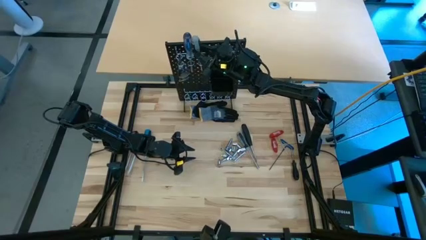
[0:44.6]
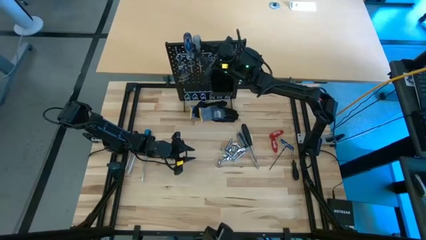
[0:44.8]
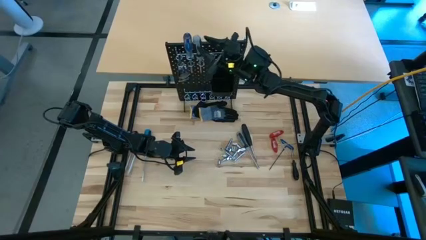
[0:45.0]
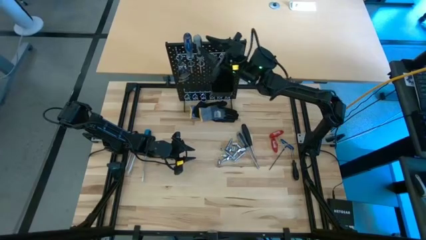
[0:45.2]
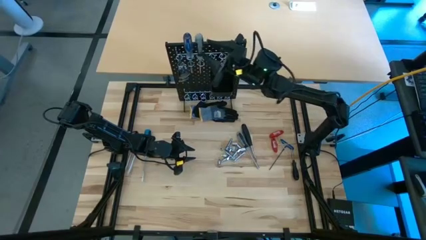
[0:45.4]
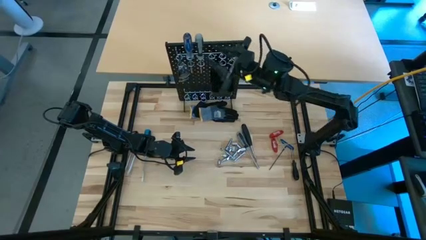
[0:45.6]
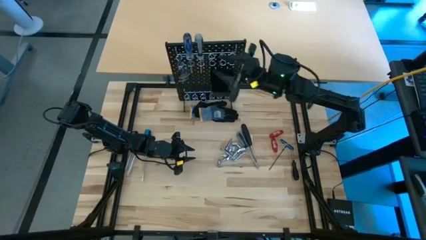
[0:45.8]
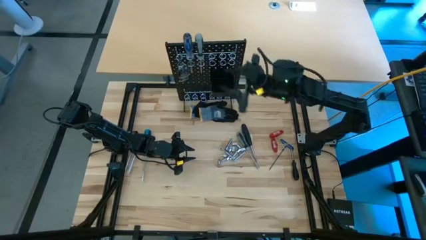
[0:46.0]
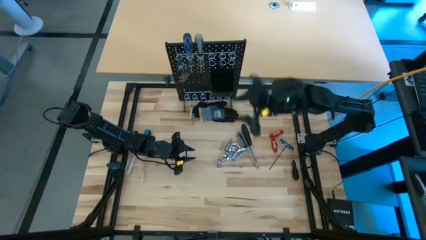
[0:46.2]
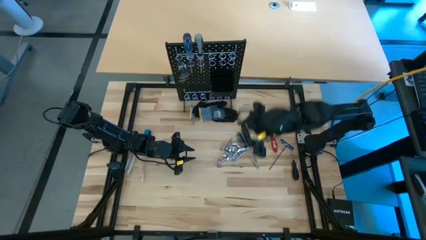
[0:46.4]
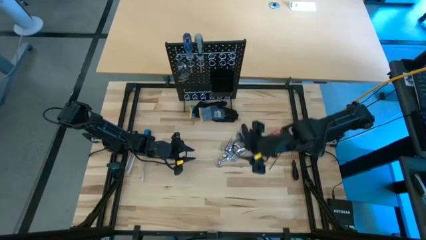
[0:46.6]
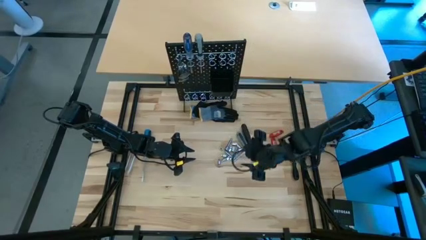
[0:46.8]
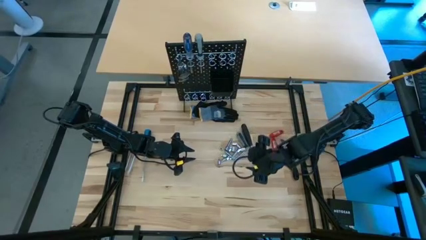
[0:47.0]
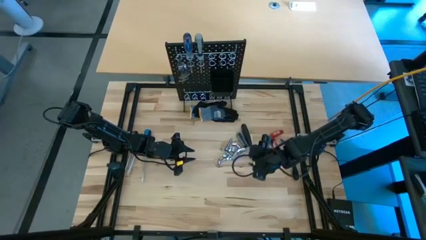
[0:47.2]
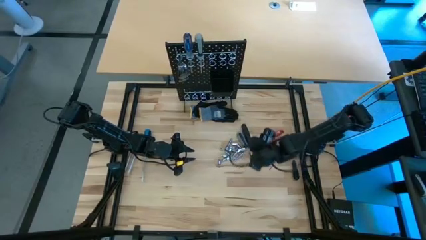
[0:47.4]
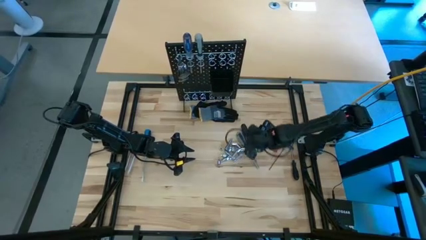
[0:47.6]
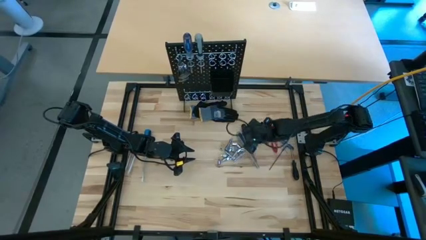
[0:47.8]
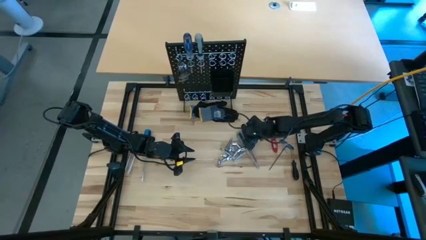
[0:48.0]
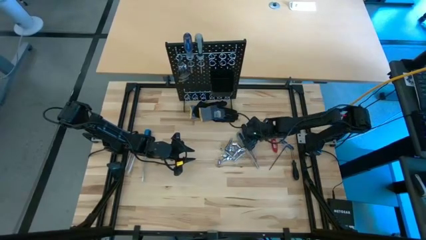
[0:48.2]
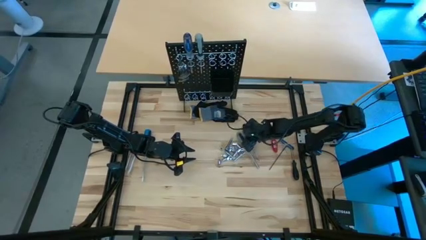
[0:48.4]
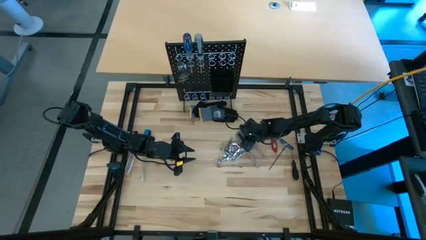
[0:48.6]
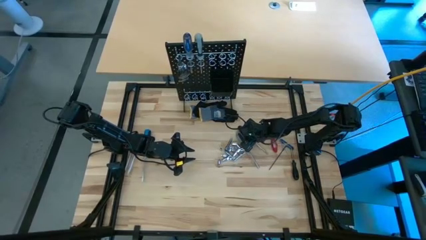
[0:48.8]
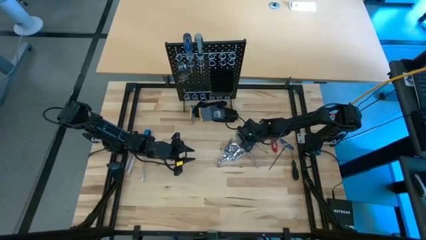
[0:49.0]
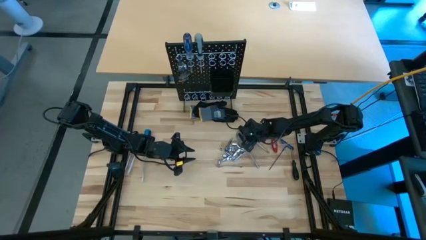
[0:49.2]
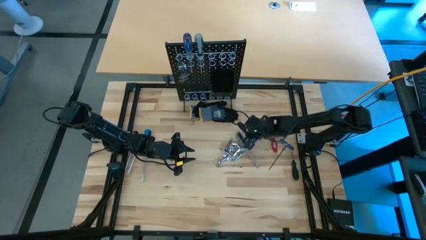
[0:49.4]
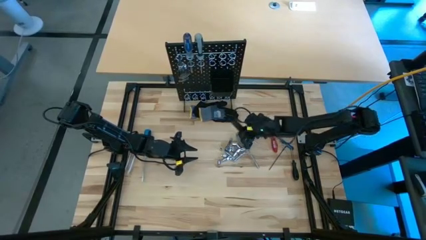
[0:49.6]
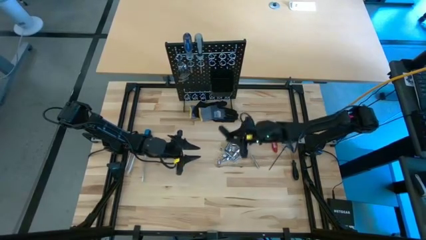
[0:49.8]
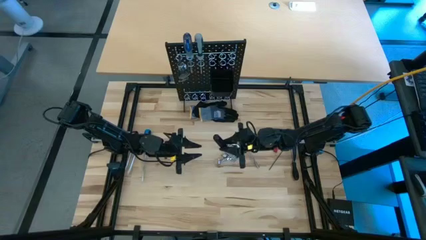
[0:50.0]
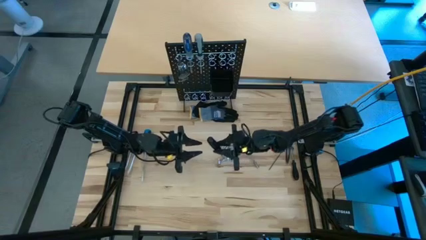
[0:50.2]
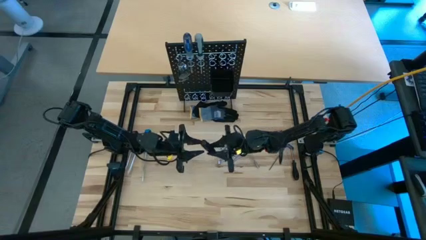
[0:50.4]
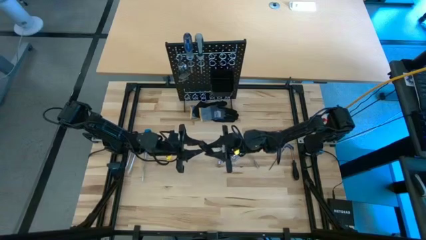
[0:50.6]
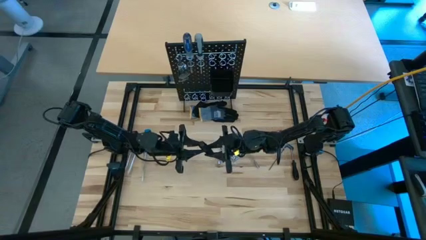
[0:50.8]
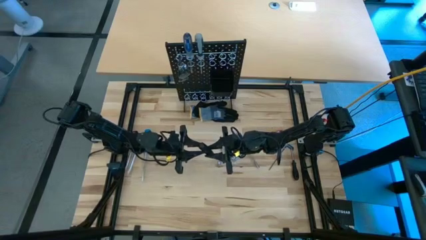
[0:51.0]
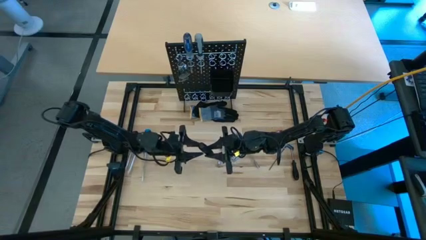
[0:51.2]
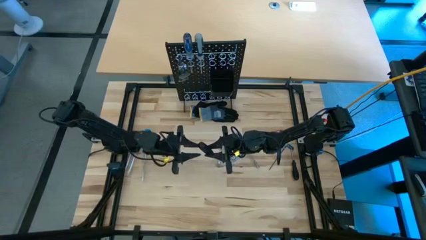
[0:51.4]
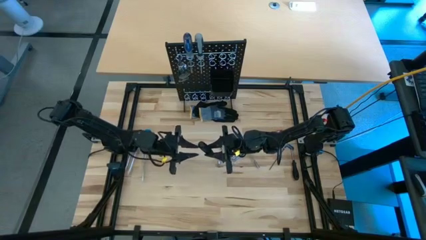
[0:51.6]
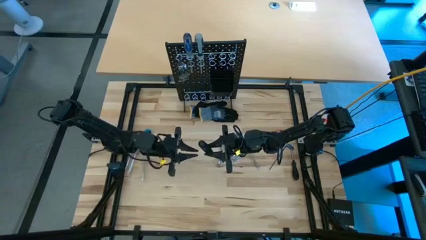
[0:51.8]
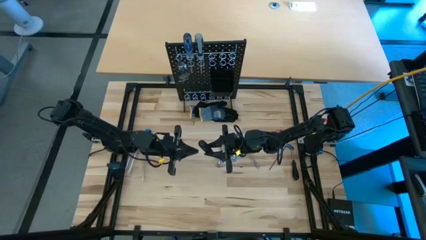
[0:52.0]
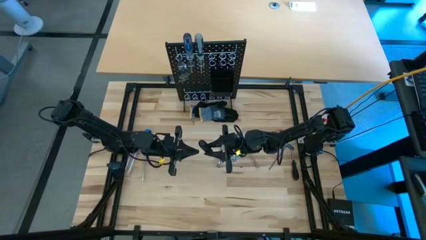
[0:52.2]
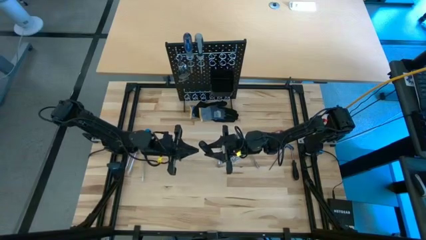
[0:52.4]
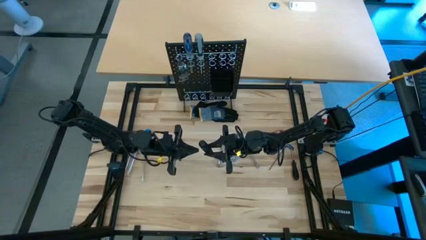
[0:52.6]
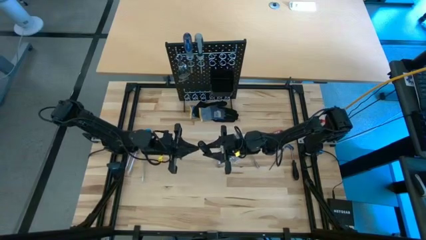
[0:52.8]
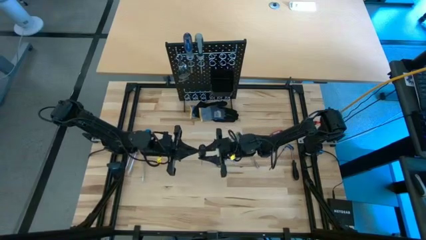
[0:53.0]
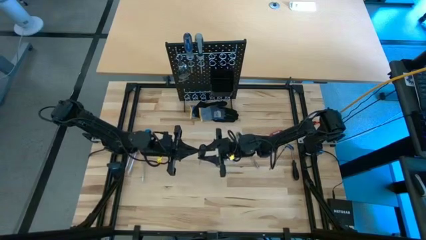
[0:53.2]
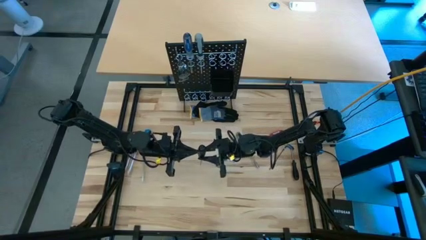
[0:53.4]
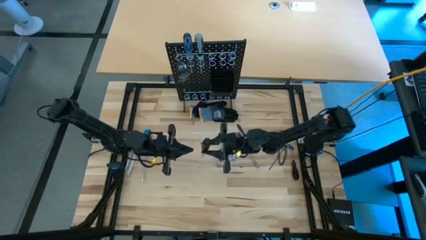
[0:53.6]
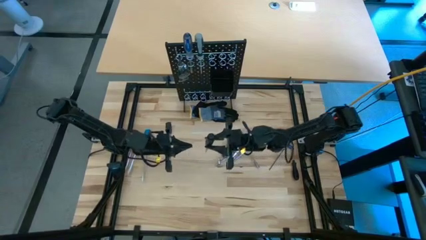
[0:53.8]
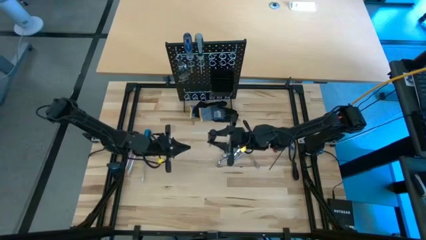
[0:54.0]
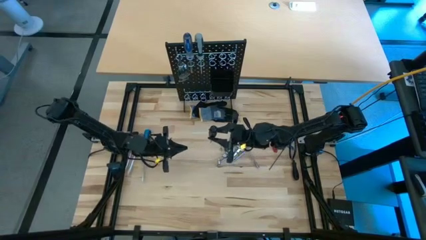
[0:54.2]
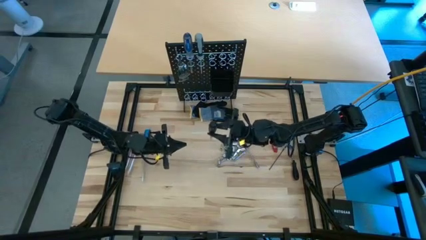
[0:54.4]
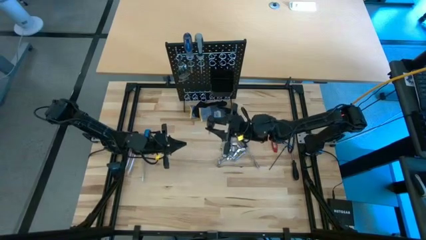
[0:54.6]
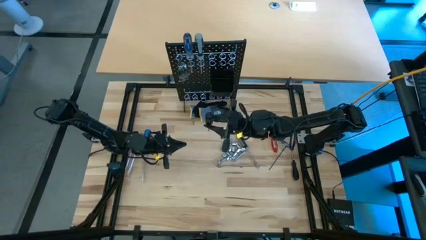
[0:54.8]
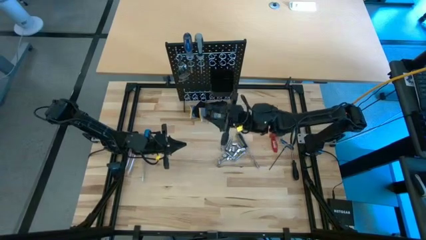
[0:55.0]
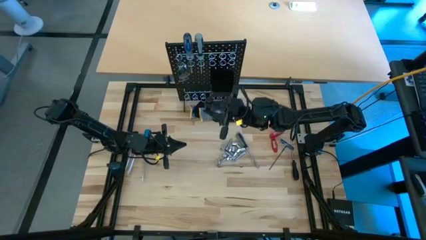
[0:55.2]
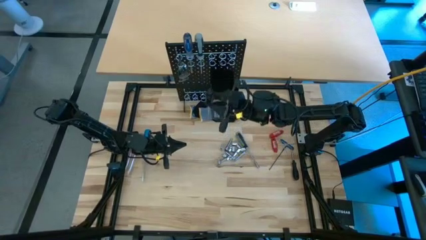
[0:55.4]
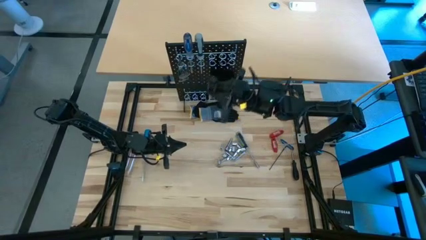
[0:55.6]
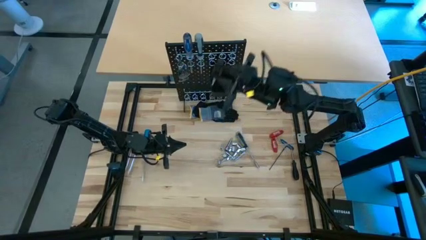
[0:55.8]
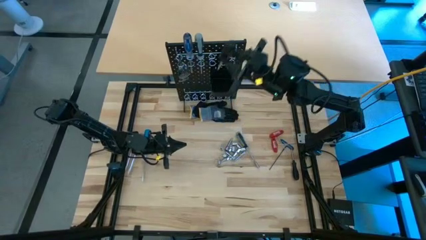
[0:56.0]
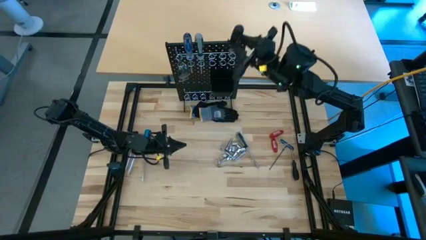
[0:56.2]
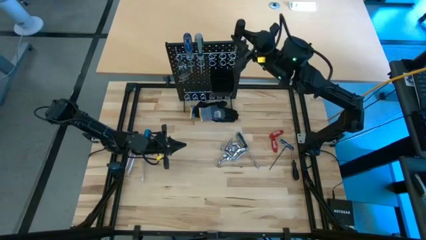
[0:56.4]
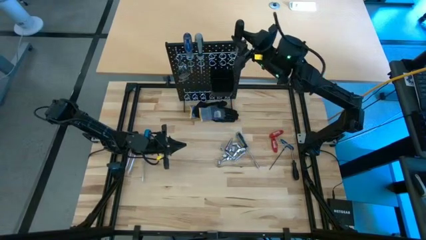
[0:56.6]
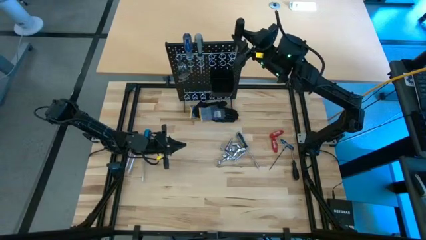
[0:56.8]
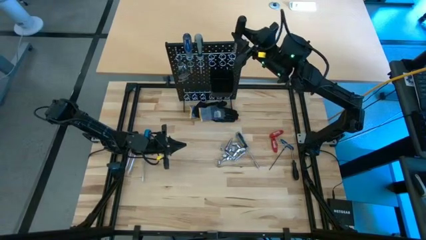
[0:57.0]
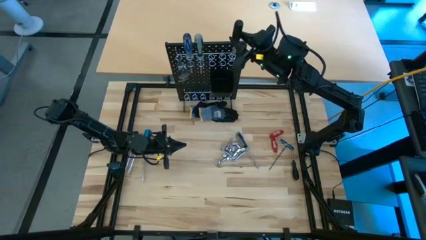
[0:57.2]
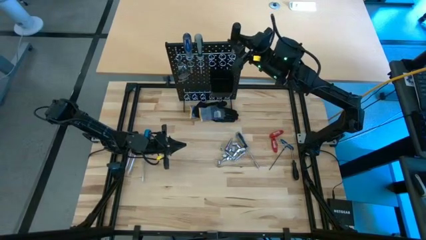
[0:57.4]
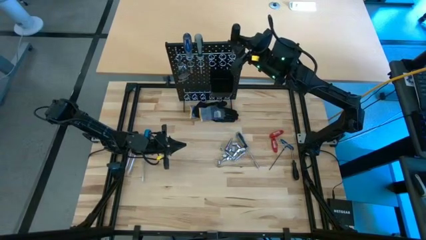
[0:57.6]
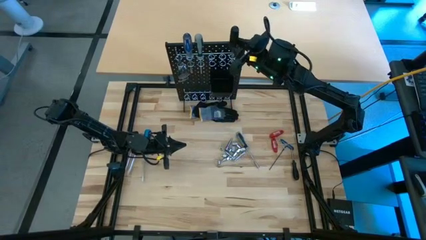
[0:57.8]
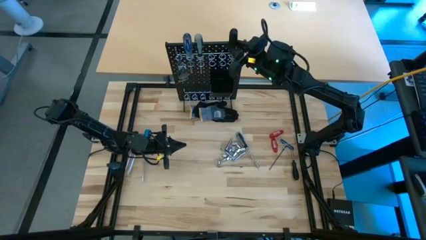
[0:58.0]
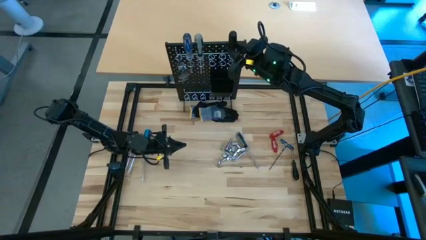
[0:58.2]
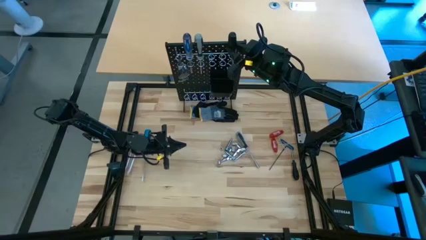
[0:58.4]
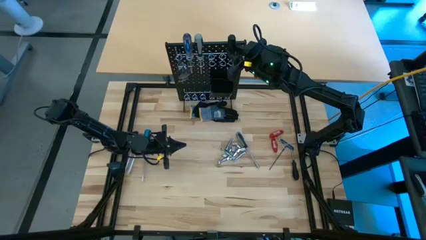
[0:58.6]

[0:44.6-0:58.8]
Task: Hang tools onto peg board
Hang the black screwdriver on the pegboard

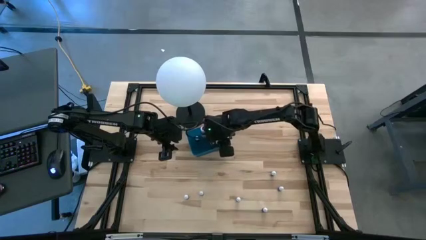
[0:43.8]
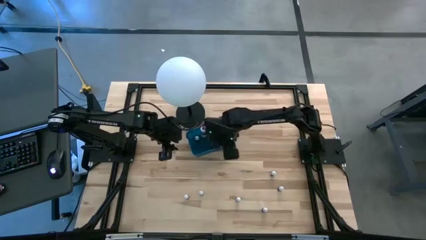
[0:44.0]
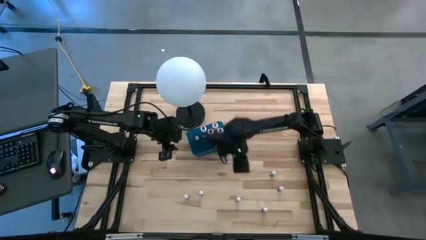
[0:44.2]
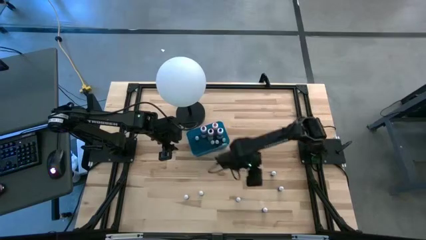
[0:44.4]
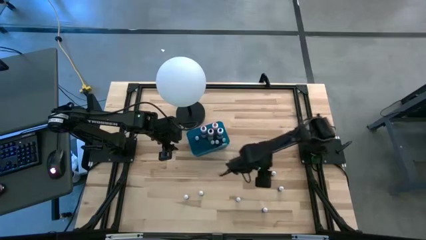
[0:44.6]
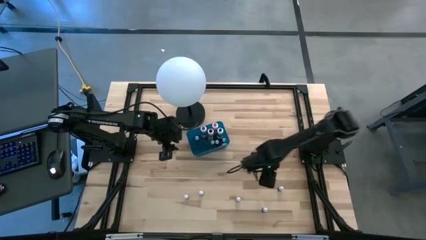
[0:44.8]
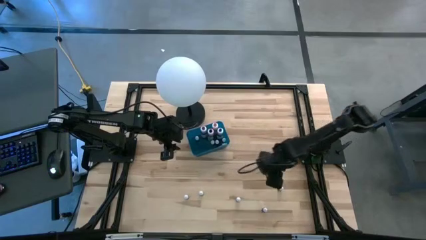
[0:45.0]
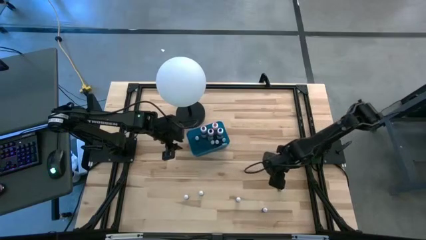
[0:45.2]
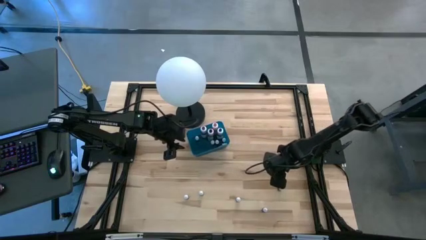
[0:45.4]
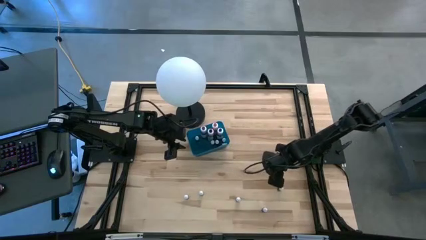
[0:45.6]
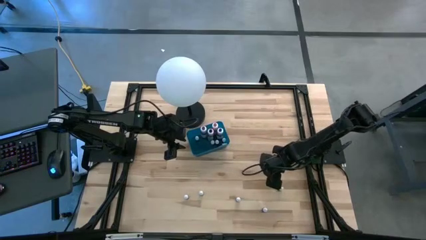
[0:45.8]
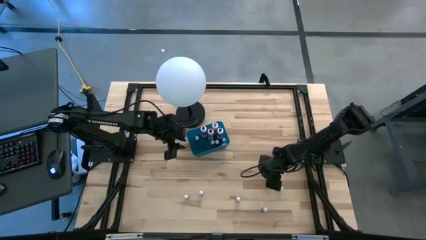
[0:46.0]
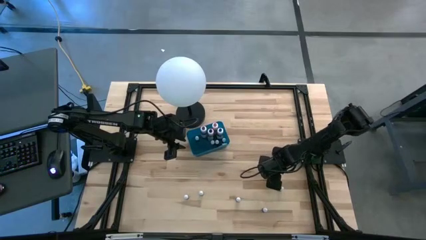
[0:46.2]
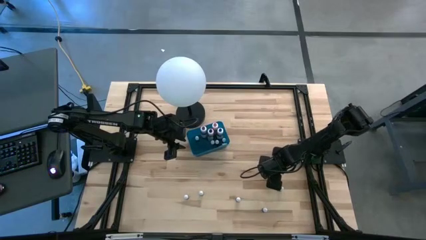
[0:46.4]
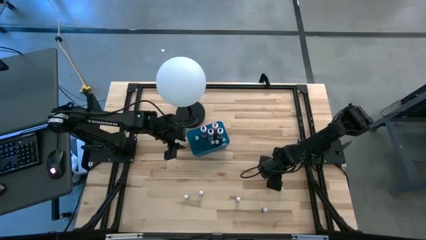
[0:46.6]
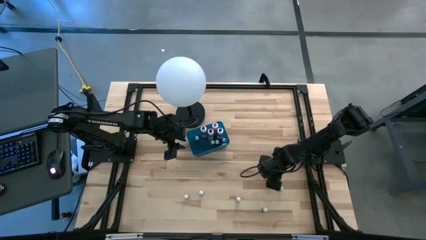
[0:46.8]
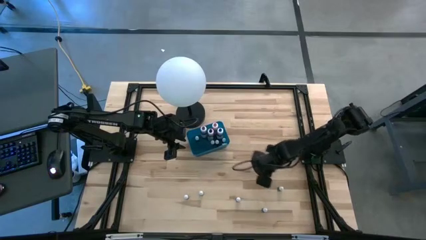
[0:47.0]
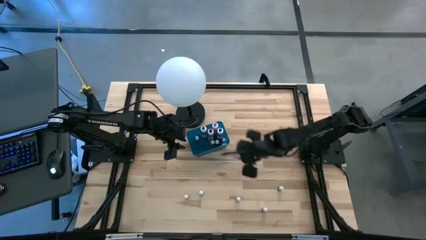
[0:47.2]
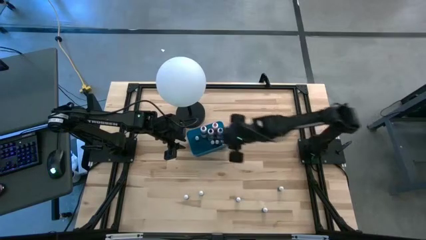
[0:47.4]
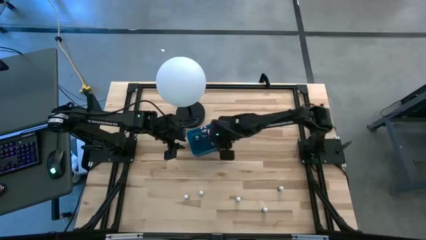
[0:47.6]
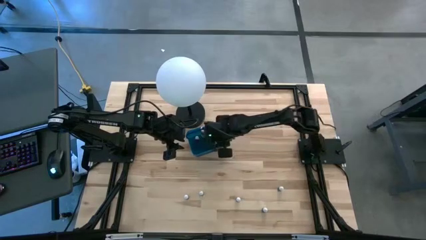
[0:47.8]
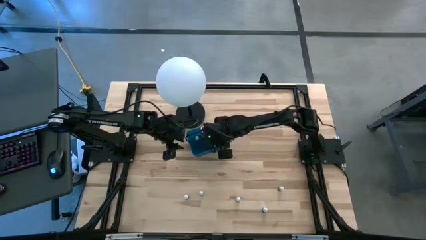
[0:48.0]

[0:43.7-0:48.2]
Task: Pick & Place food coloring
Put the small red food coloring bottle into the blue container
